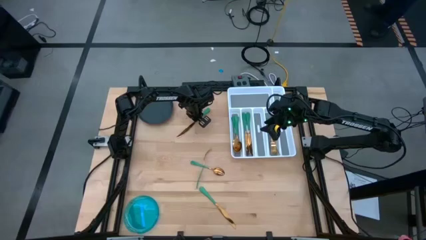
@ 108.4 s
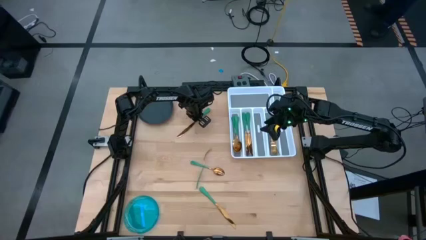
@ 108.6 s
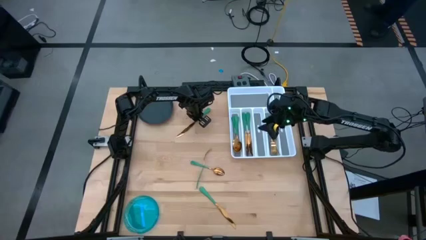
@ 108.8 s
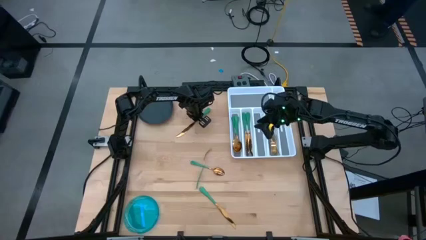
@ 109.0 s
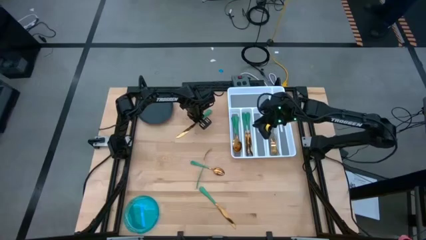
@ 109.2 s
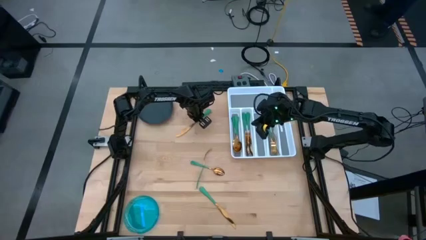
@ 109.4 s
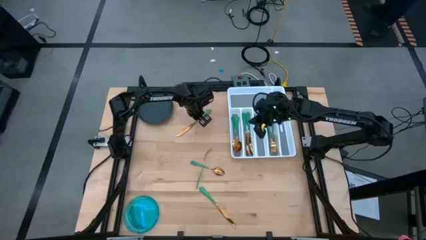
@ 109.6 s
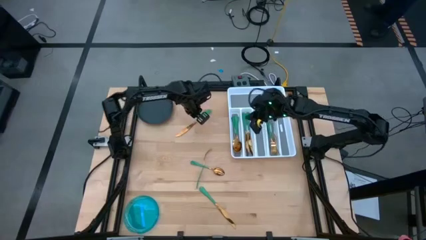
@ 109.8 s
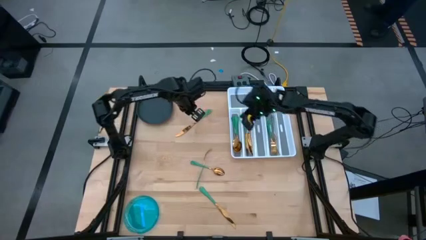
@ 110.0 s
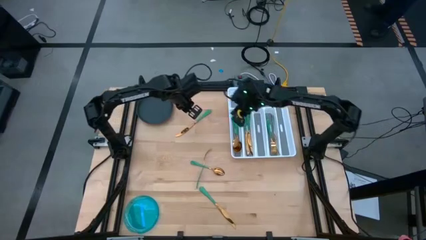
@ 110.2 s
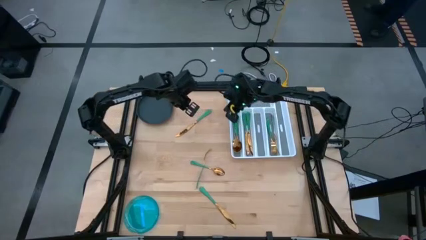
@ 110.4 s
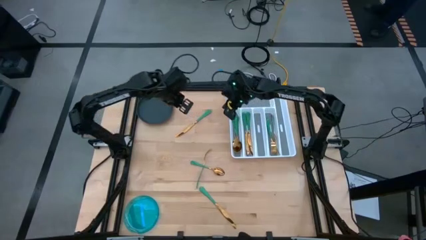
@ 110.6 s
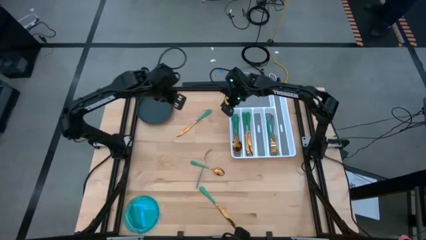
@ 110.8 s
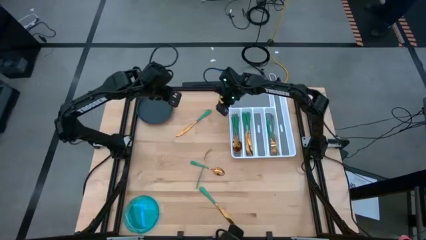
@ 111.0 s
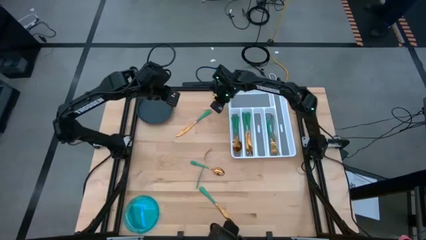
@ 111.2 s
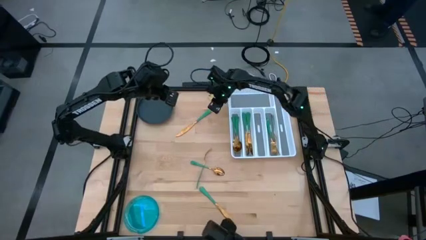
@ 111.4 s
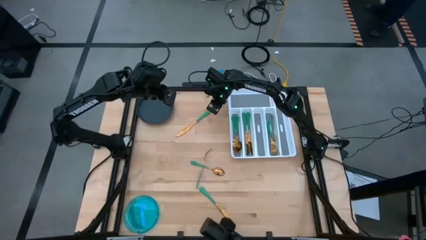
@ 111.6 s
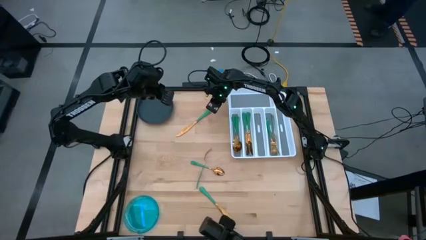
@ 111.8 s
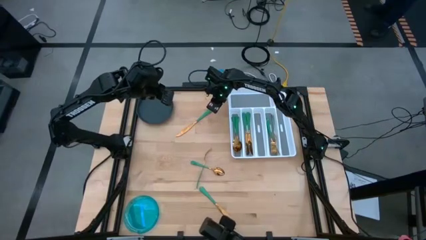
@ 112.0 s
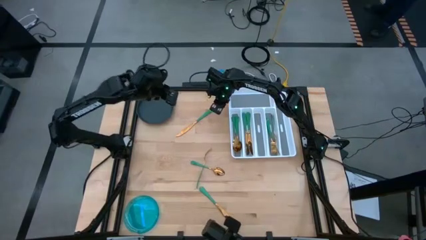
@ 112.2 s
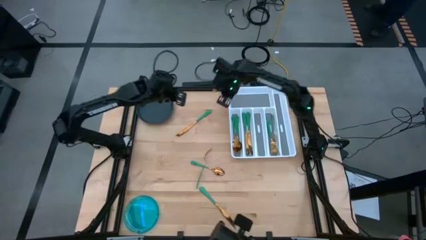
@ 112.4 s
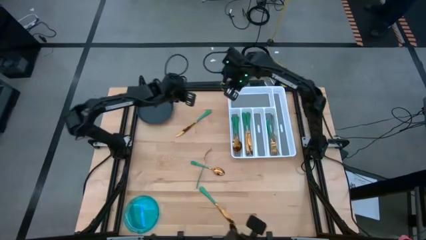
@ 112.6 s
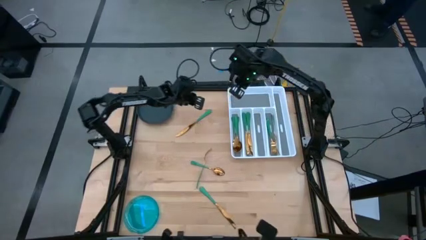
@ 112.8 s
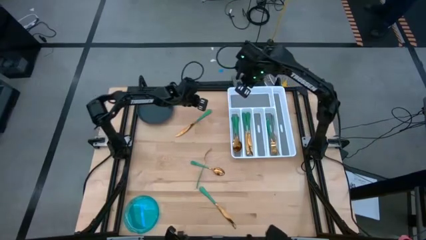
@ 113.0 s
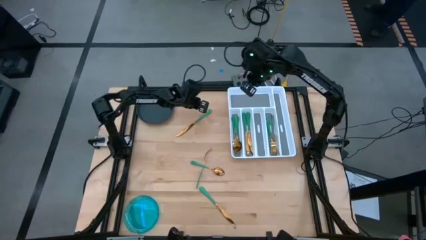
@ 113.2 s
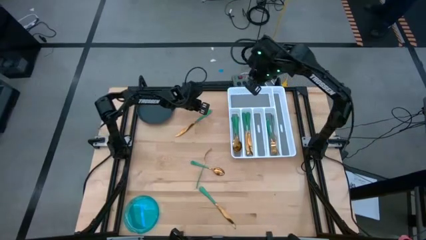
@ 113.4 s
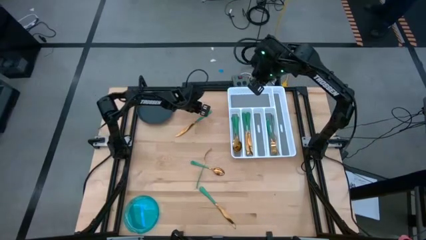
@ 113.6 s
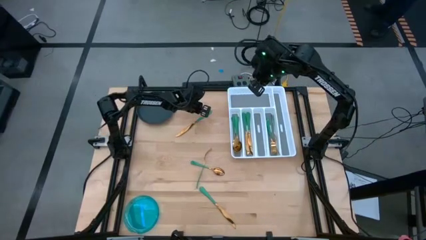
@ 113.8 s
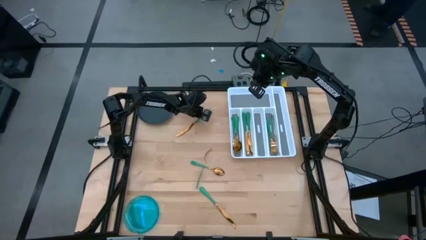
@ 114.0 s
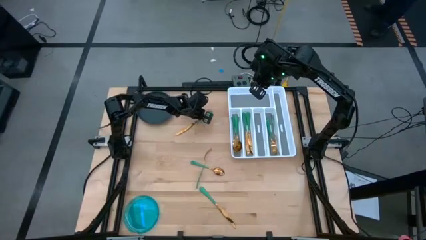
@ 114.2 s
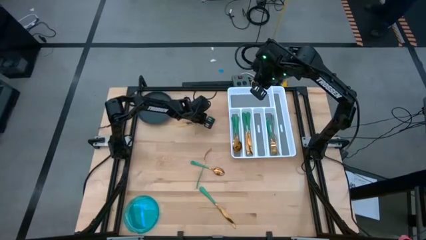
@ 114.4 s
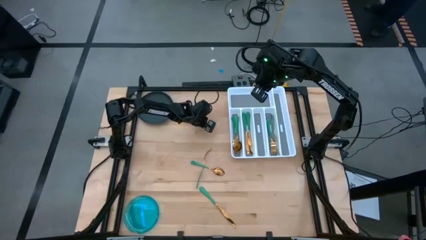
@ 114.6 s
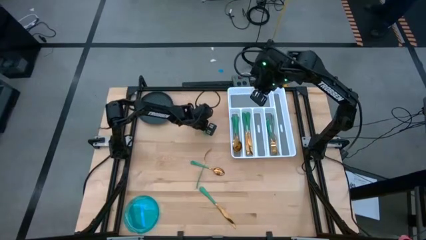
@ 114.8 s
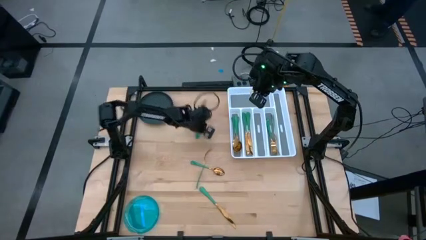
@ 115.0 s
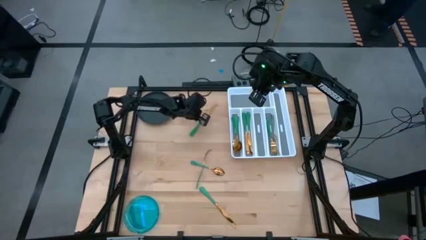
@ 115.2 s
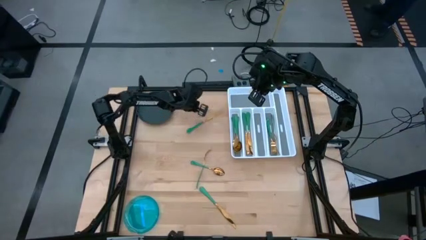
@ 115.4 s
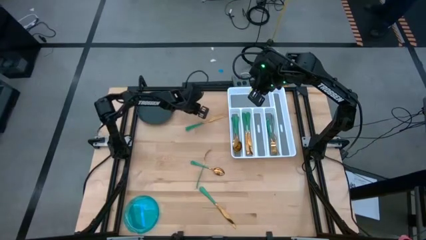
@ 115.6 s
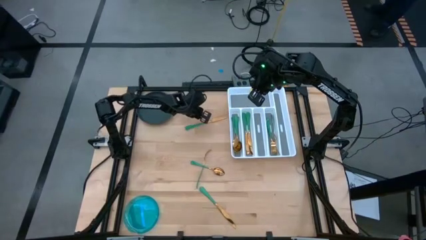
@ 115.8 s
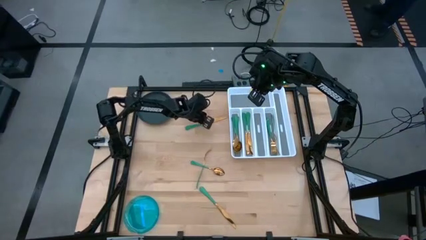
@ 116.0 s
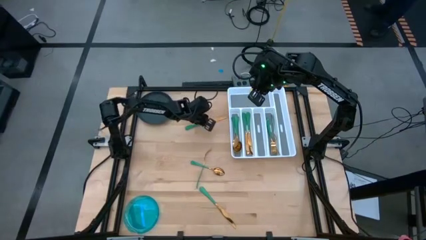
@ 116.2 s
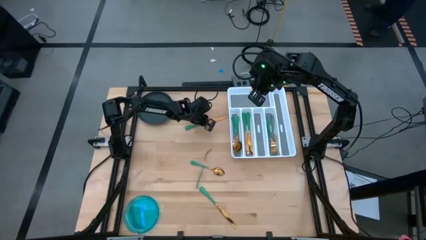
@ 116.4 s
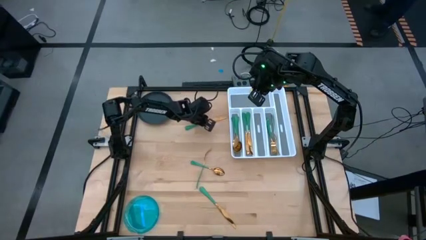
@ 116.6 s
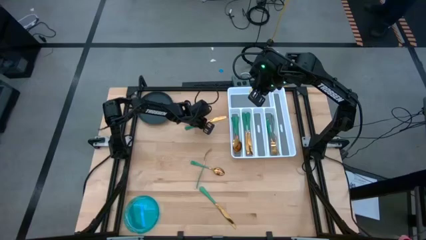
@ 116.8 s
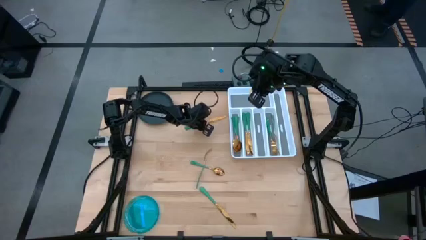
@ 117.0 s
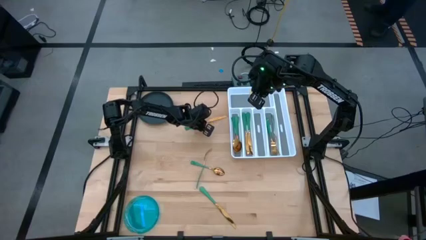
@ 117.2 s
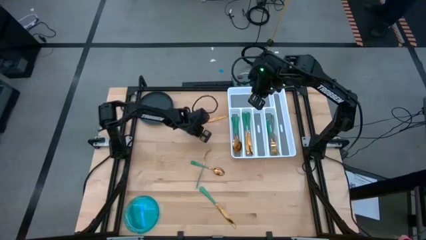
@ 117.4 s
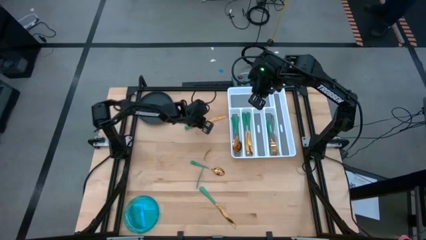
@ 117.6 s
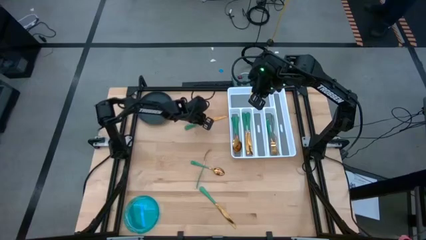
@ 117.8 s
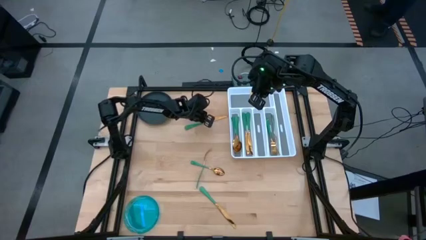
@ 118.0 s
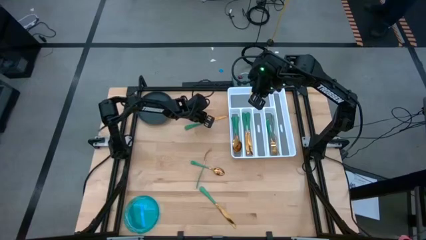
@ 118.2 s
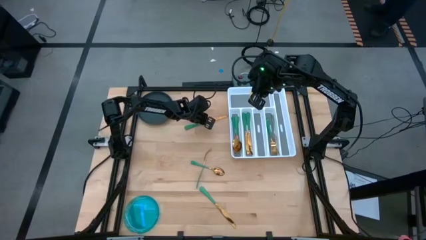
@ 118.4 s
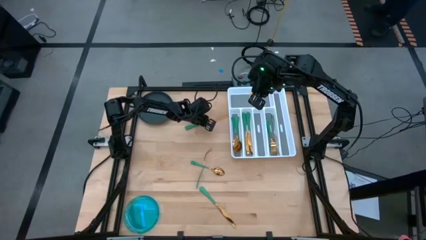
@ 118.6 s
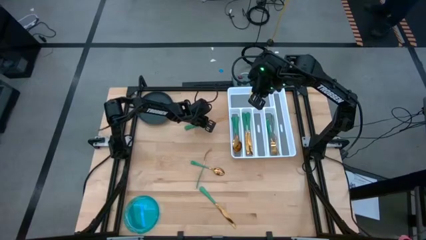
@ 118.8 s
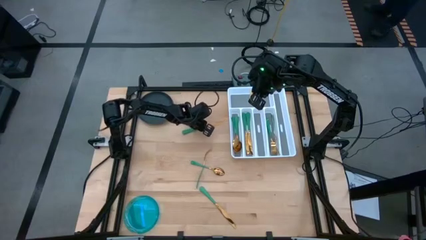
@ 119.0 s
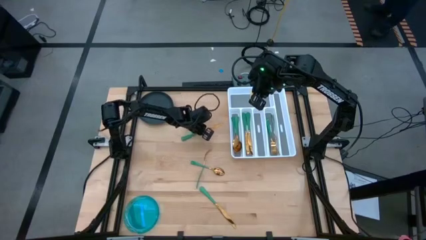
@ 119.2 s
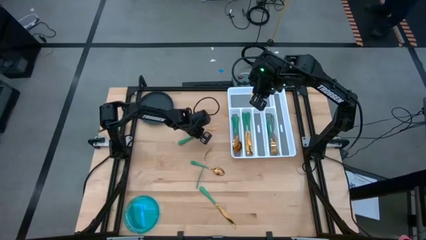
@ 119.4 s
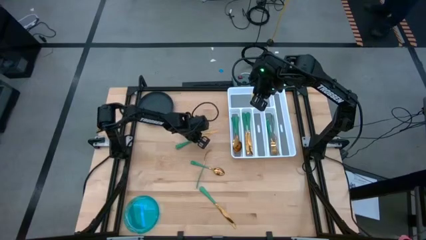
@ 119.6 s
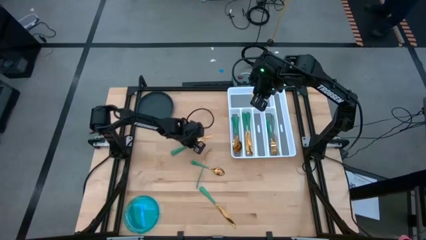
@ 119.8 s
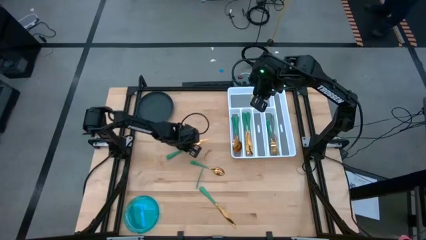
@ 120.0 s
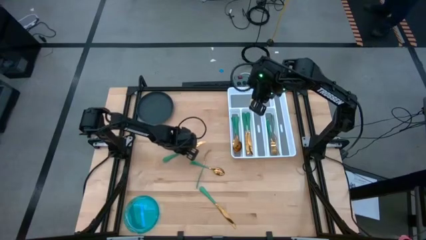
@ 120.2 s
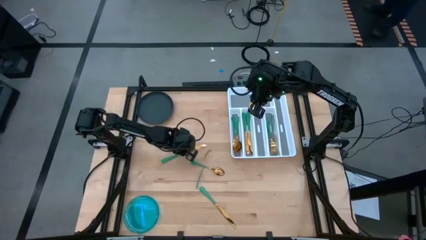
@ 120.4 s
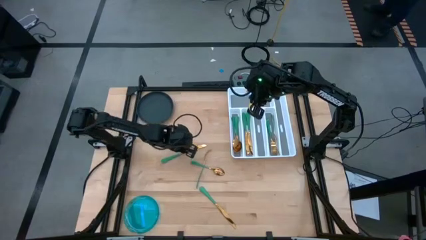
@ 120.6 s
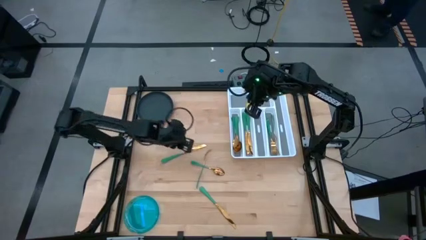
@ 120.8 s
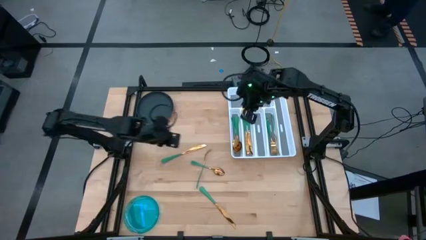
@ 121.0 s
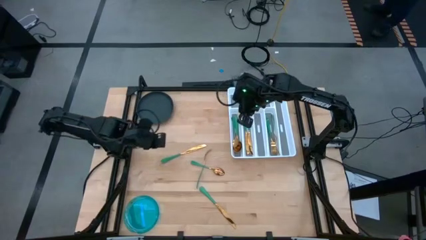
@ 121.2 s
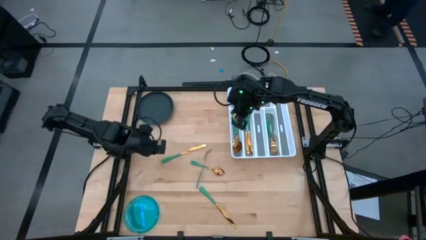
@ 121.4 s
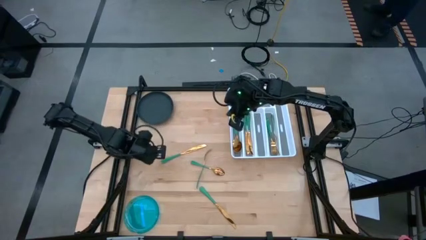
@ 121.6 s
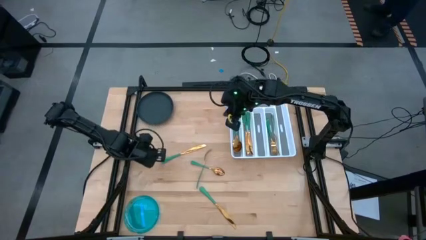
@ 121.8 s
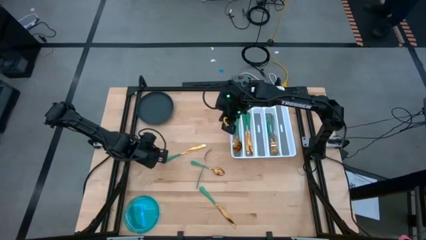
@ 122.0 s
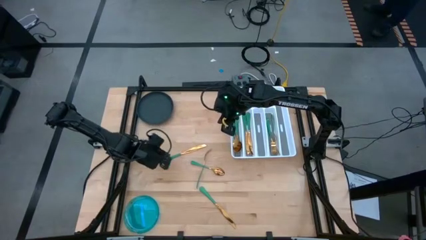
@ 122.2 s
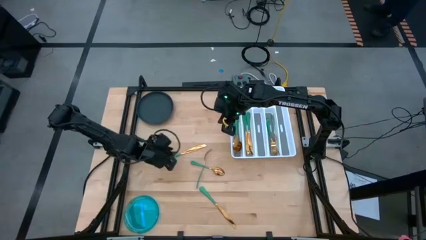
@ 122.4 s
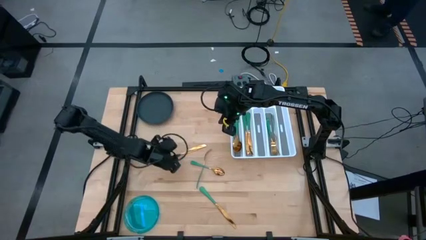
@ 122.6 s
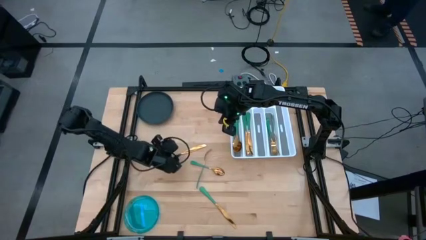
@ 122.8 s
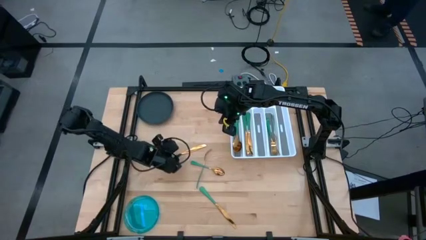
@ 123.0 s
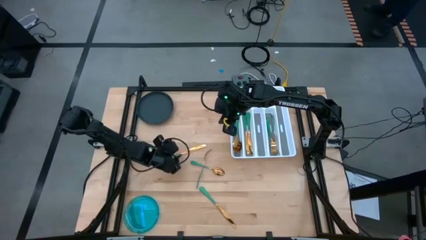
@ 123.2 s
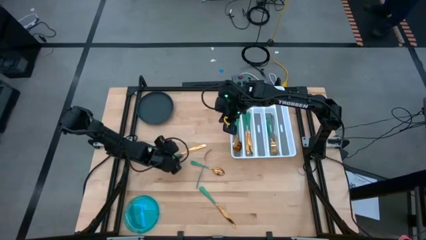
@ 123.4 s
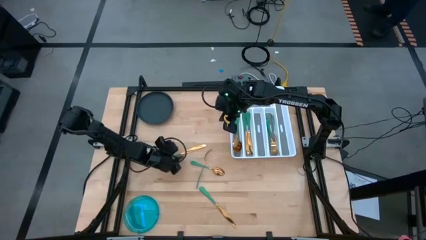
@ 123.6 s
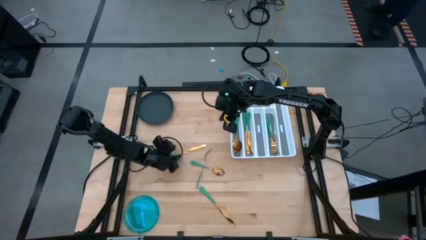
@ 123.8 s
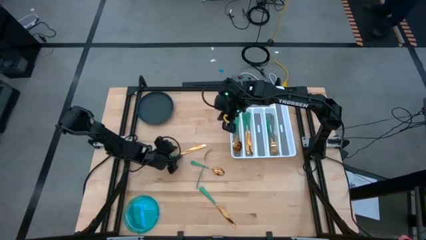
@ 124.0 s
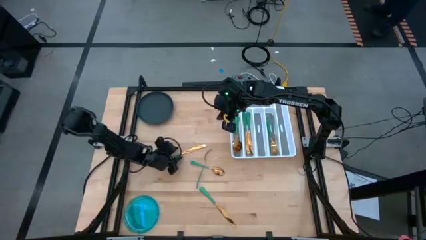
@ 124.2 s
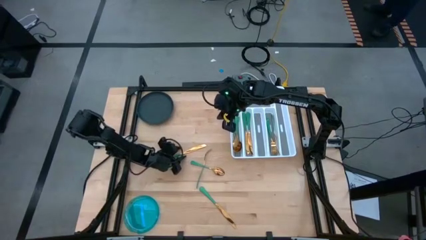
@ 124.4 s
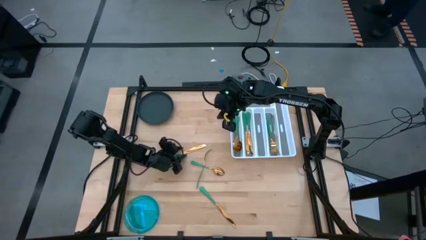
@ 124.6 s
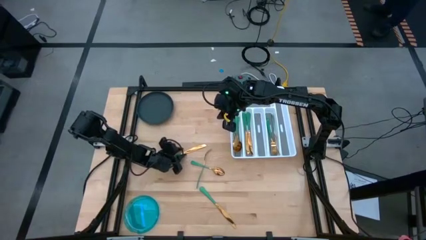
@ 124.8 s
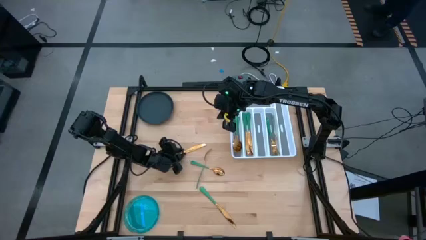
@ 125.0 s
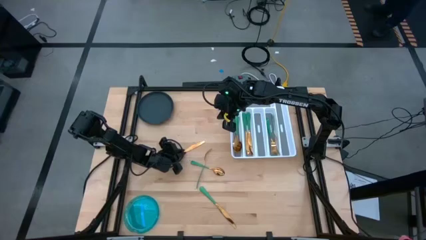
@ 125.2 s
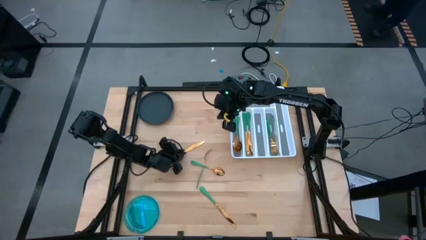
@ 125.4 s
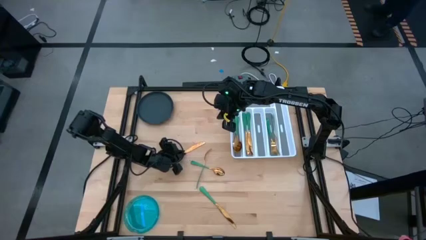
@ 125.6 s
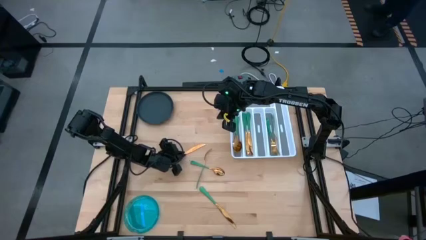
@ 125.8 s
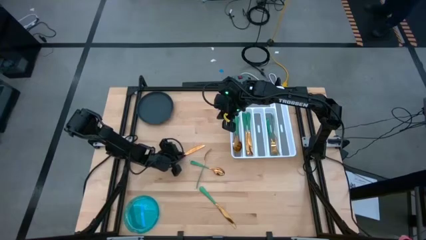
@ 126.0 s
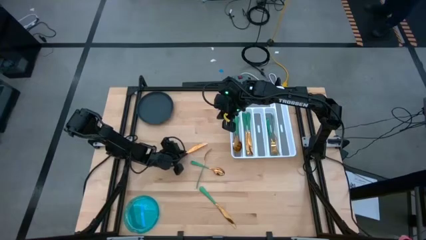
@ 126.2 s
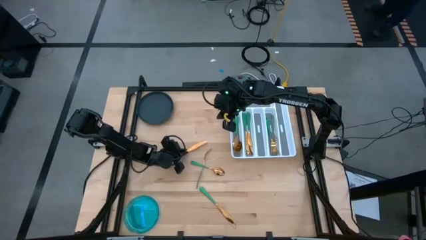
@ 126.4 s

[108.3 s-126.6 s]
Task: Sort silverware
Put the top green knife on the silverware tray with the other green knives
